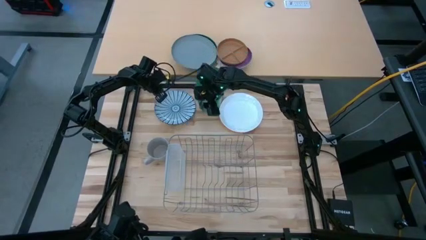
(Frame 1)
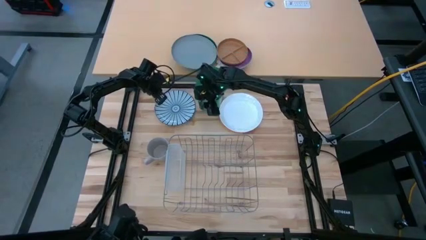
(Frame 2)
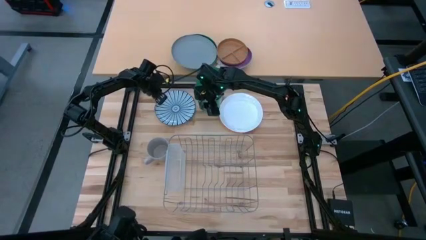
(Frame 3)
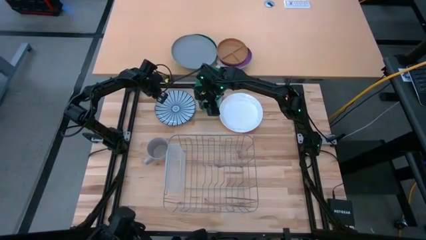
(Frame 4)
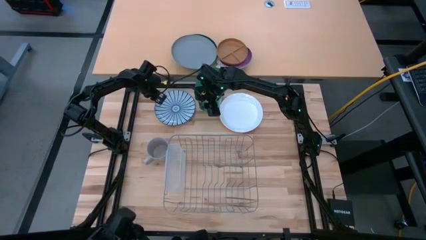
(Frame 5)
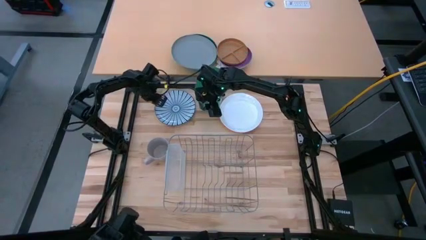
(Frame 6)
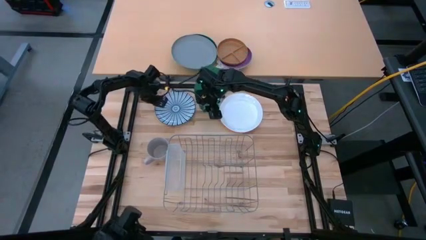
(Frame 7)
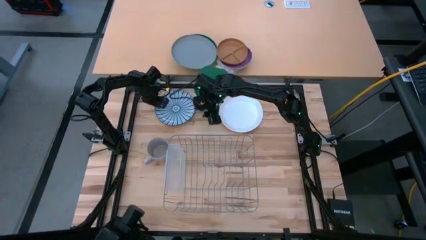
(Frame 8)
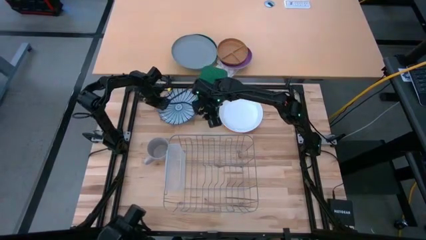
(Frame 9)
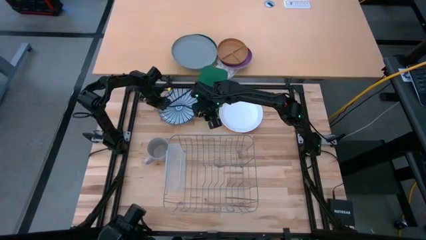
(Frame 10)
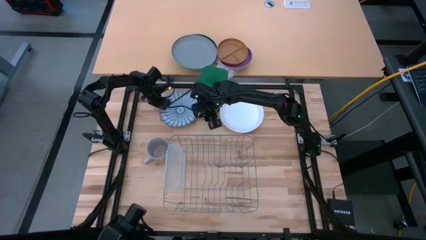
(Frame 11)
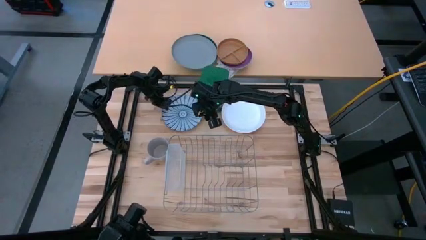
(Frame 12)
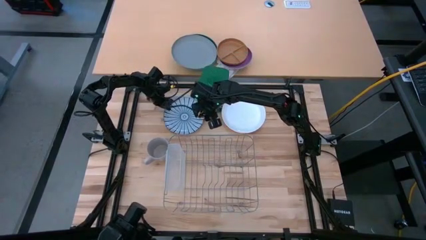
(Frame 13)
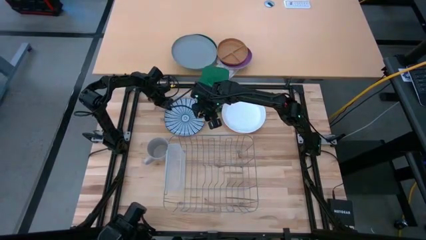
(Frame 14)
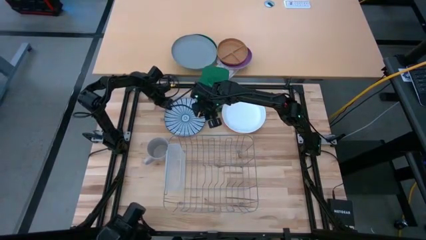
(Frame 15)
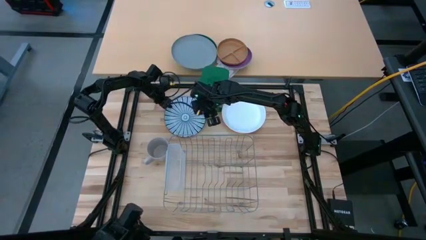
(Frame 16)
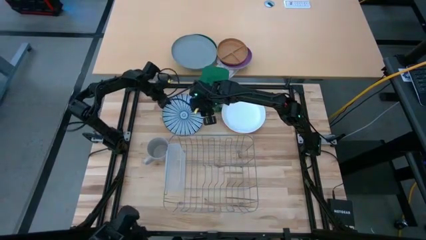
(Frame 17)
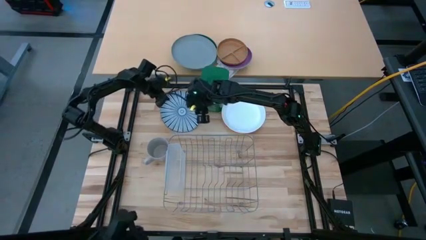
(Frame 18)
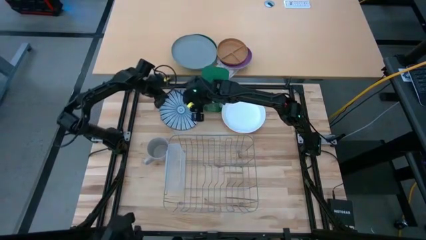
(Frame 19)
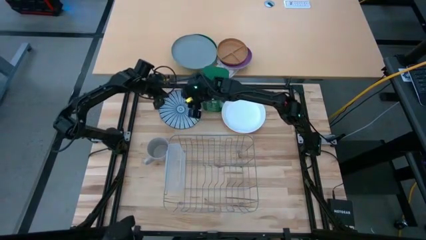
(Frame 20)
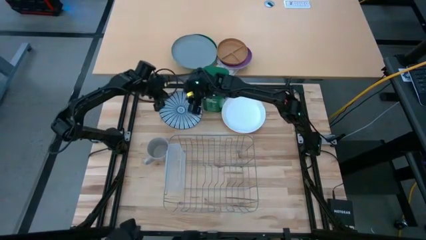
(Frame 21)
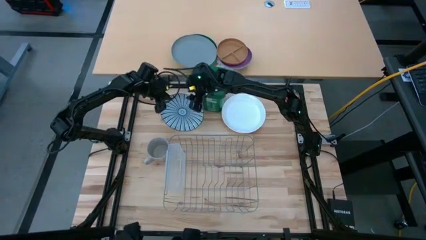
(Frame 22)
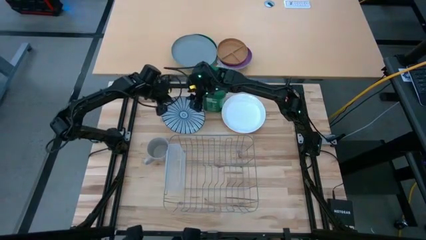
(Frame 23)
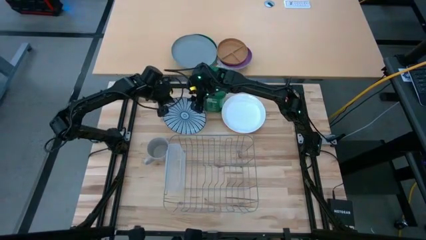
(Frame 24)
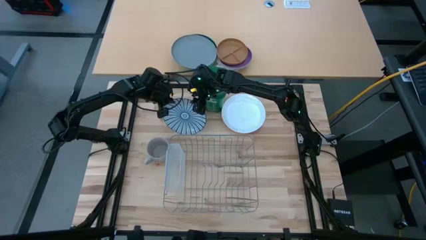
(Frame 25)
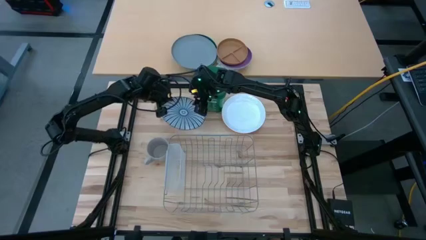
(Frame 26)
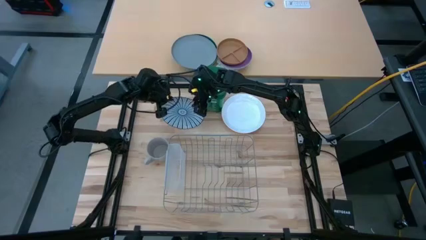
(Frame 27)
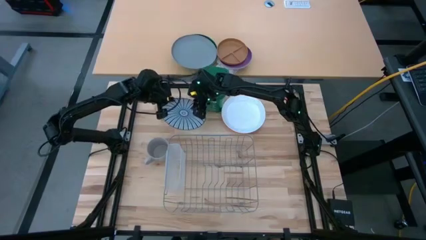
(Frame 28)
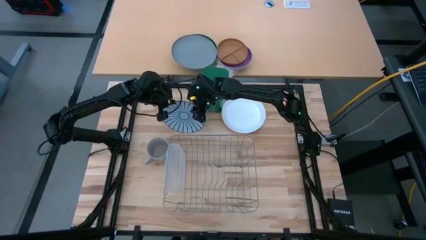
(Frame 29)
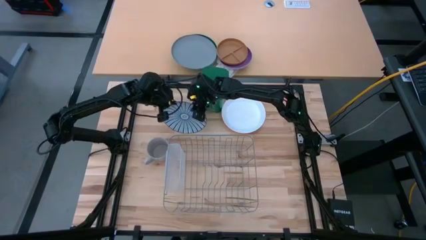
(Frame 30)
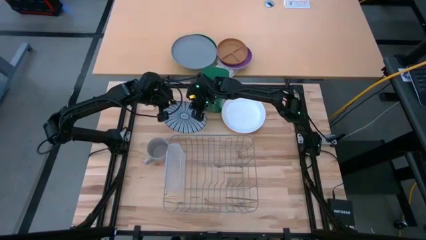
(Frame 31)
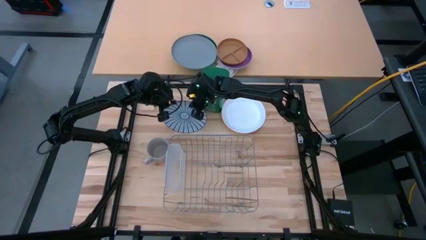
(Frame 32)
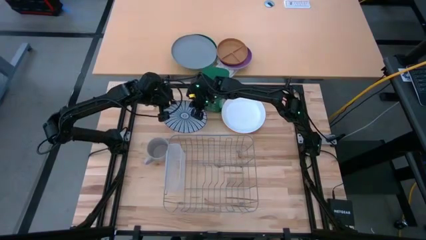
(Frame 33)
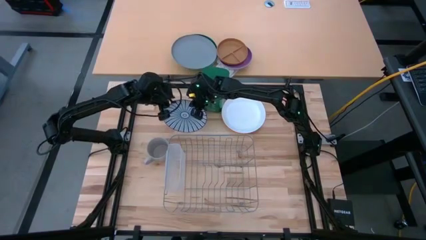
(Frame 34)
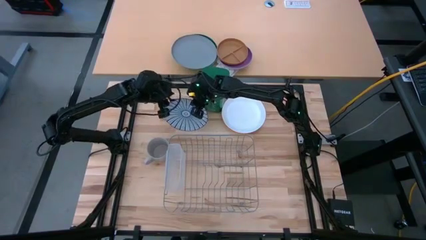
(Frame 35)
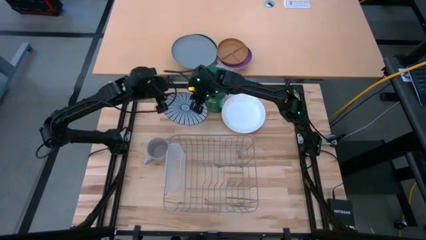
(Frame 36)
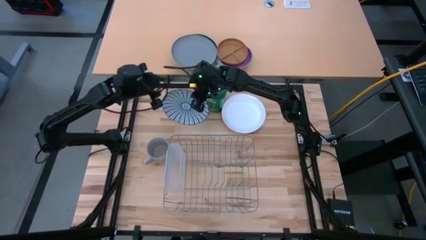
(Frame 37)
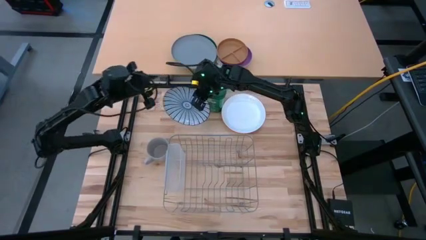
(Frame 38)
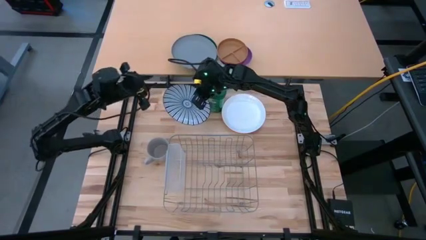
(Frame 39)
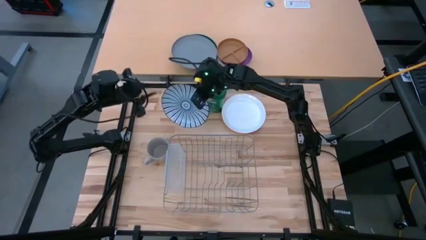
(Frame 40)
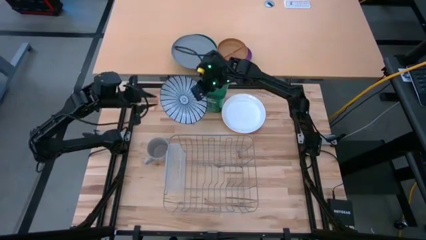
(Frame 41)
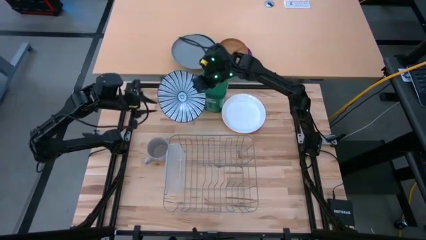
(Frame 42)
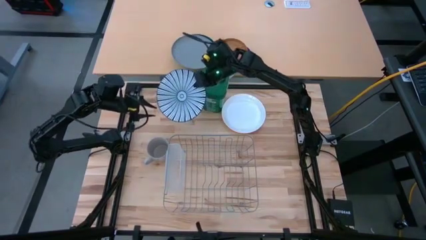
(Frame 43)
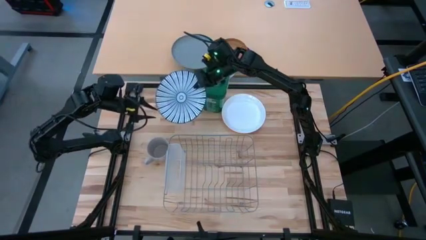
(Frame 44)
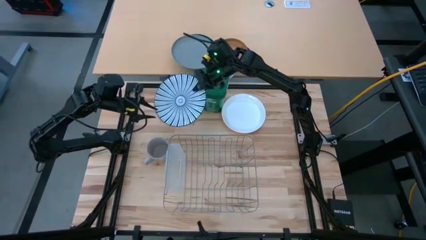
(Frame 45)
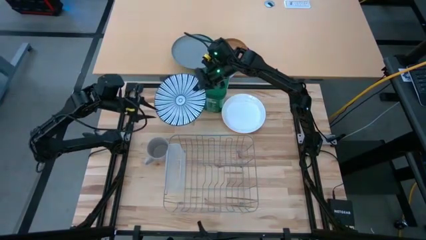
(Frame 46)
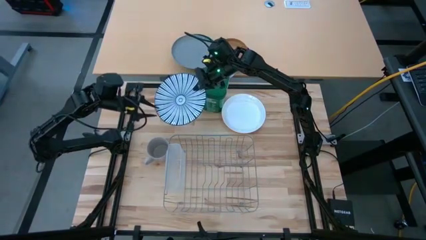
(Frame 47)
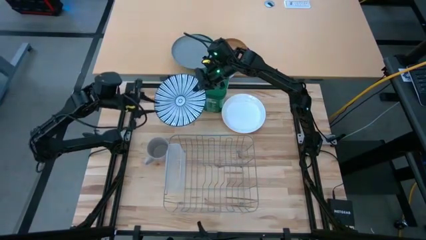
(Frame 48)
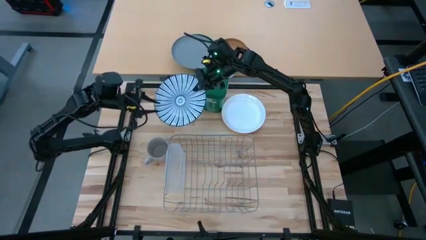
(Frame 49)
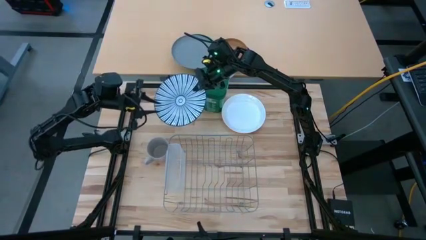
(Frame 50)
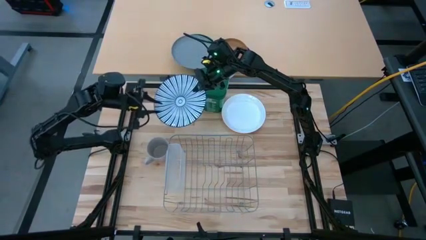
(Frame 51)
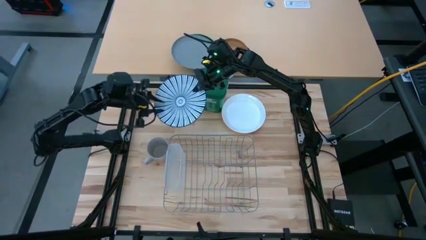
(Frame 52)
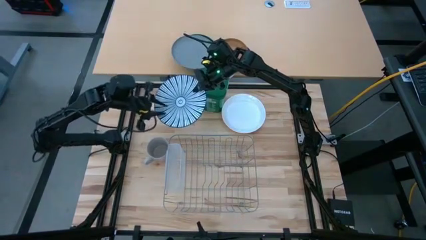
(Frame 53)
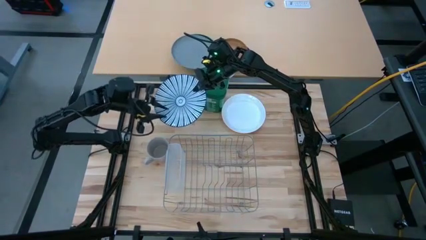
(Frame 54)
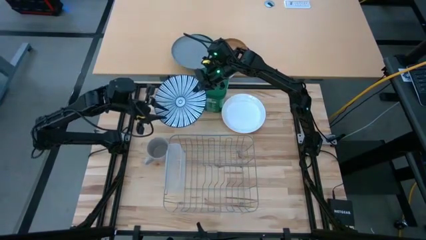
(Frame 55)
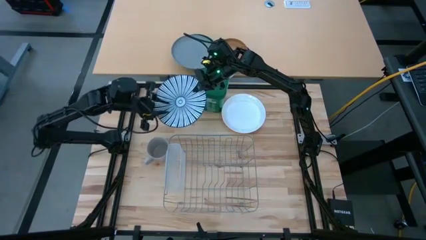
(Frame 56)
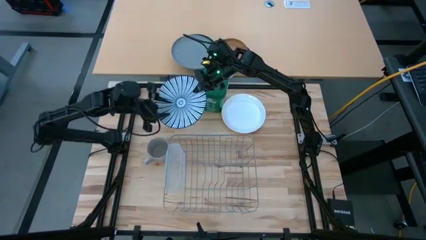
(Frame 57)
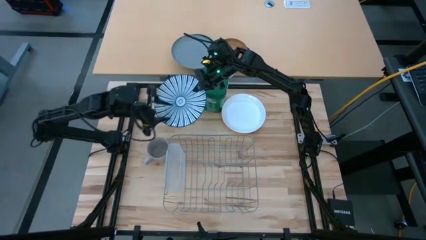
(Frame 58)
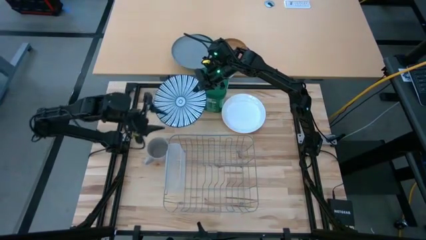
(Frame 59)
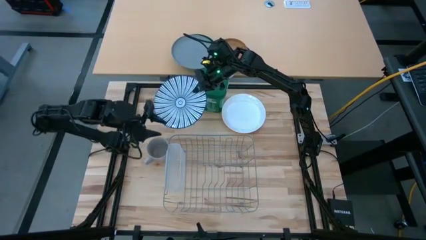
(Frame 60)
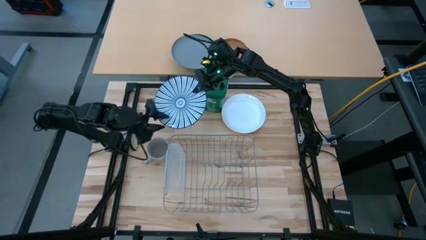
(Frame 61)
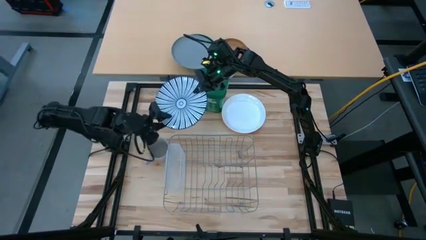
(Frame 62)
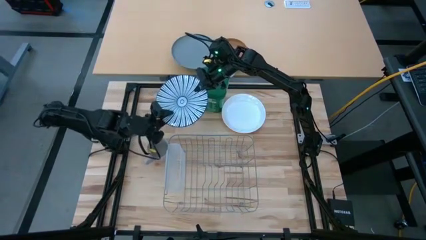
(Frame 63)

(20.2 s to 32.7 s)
Task: Sort dishes
Put the blue plate in the dish rack
